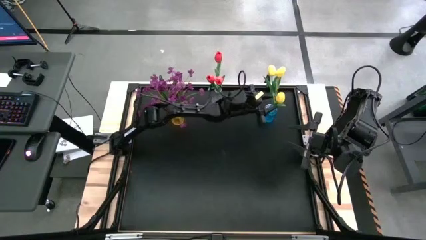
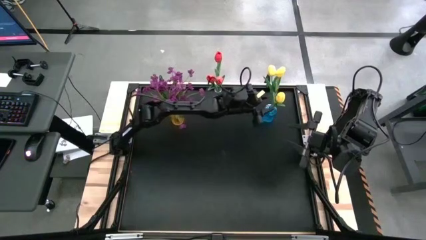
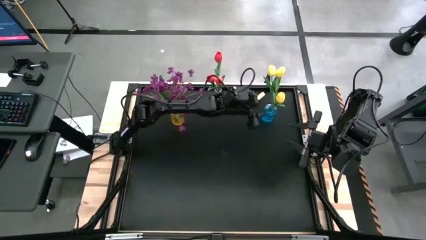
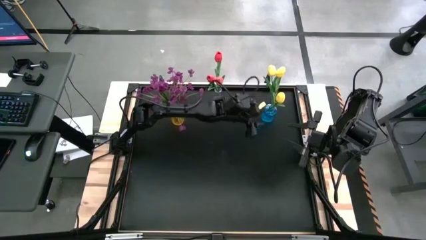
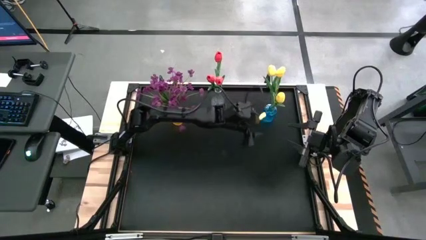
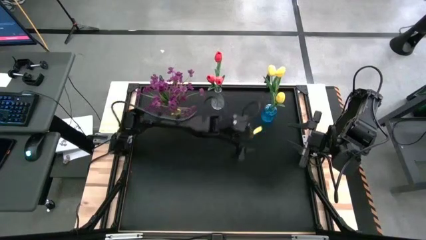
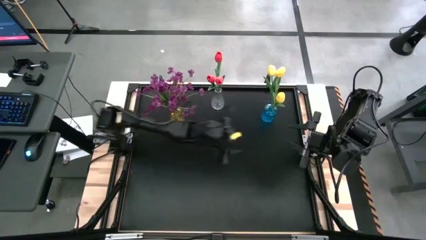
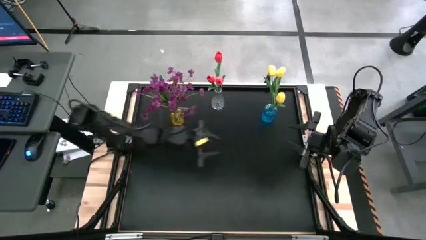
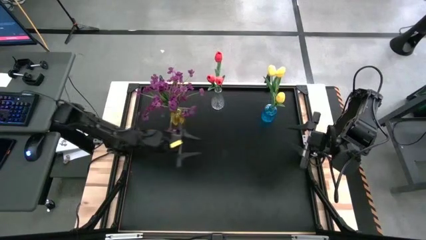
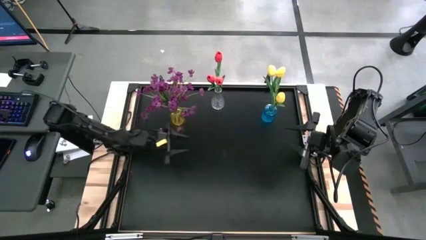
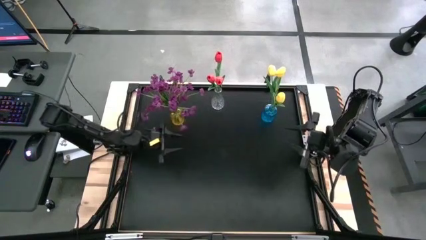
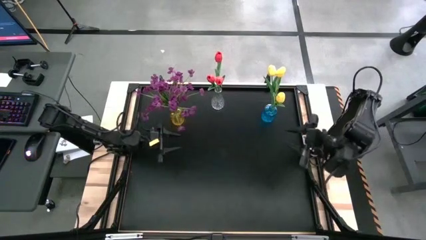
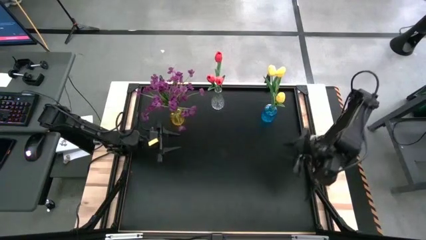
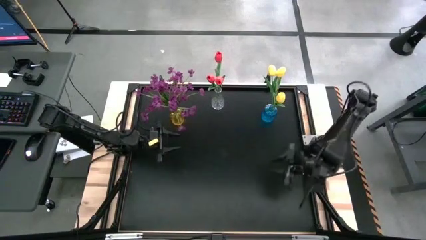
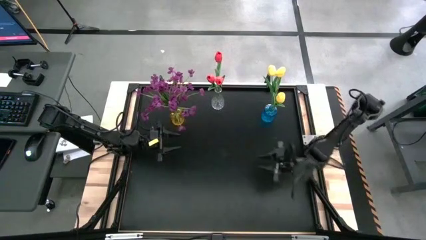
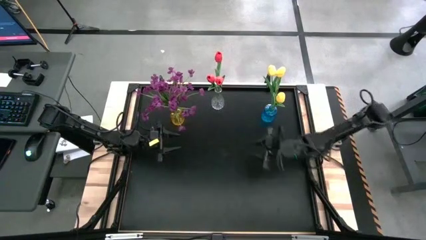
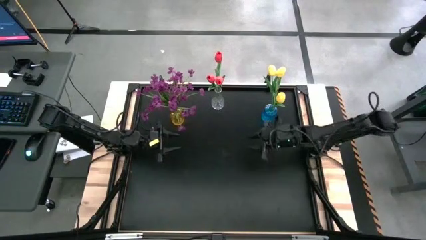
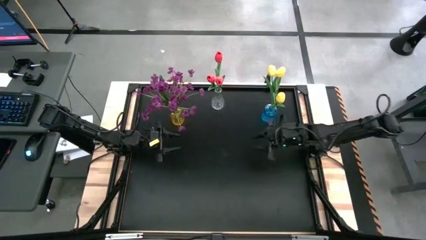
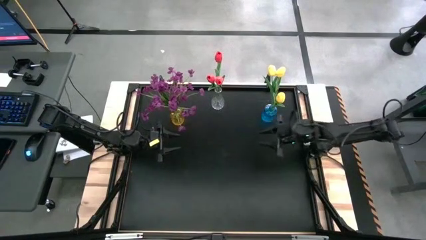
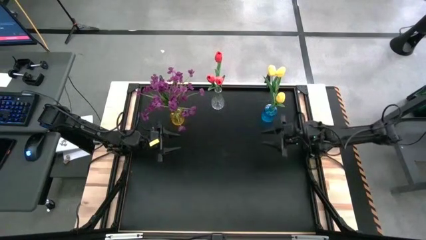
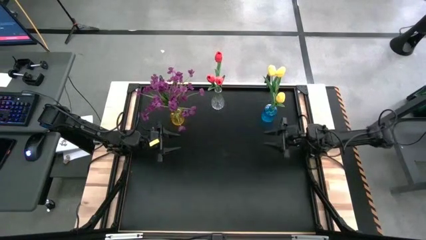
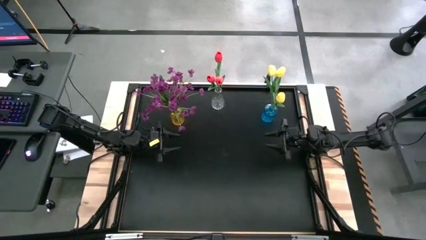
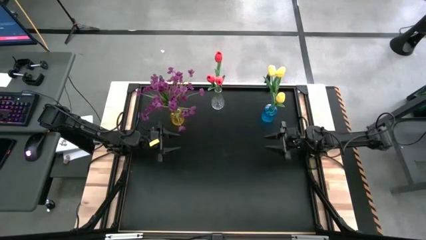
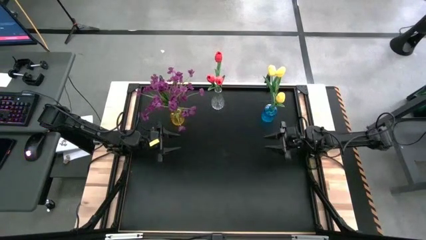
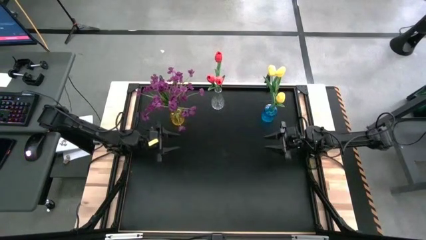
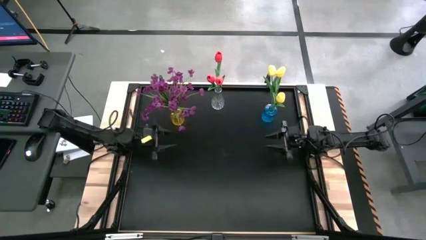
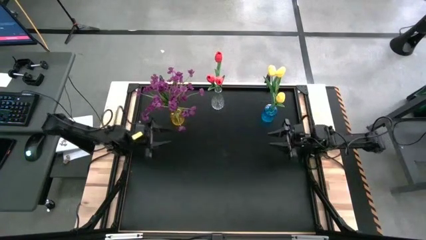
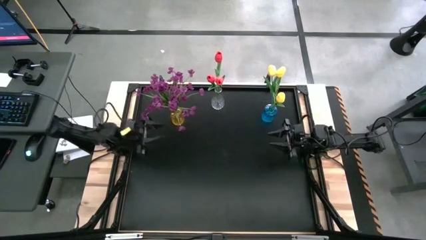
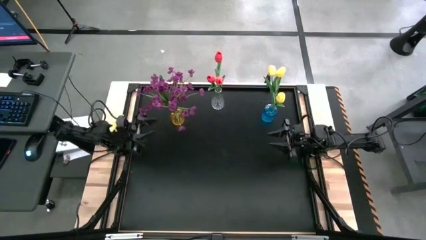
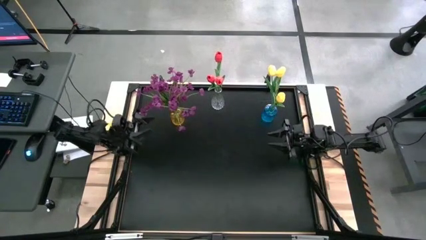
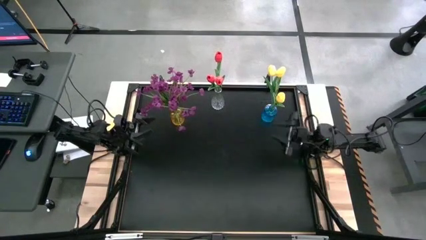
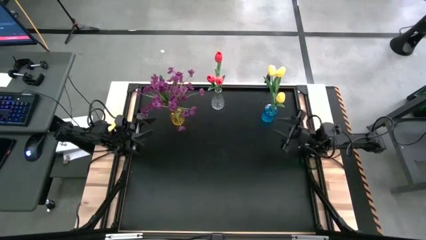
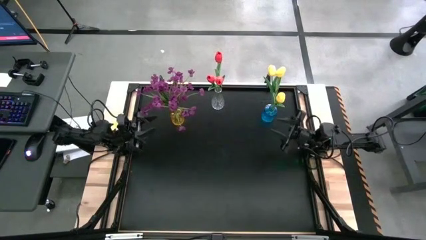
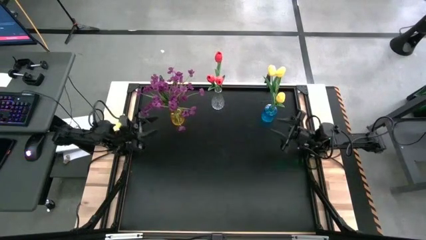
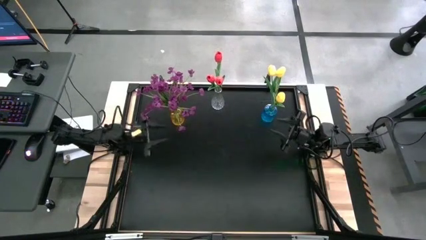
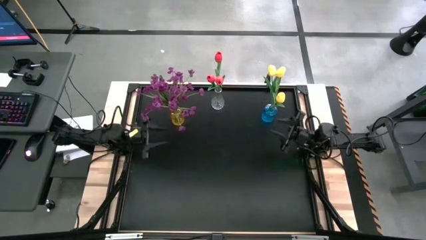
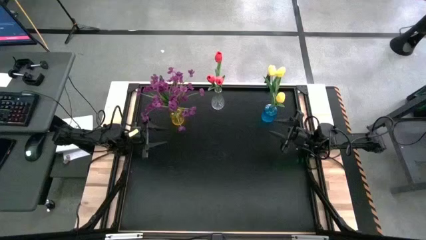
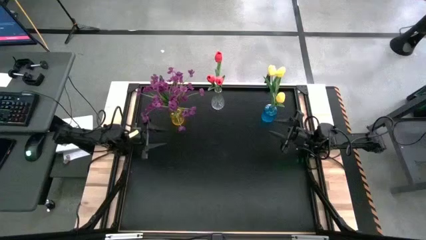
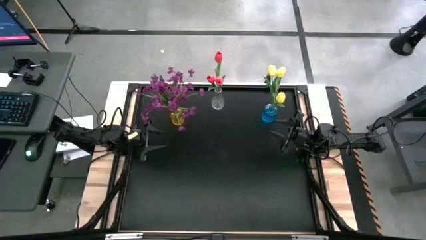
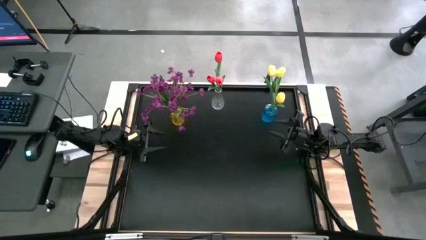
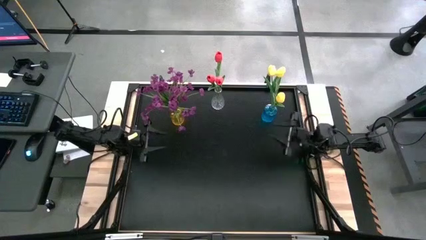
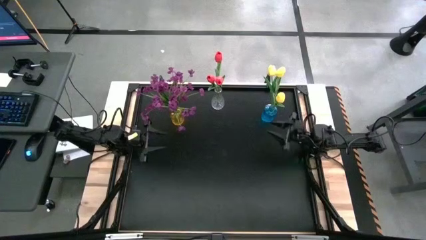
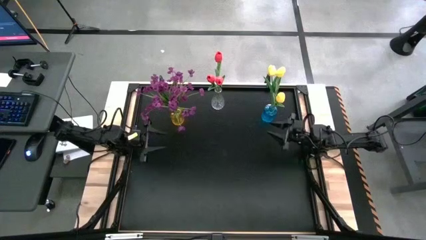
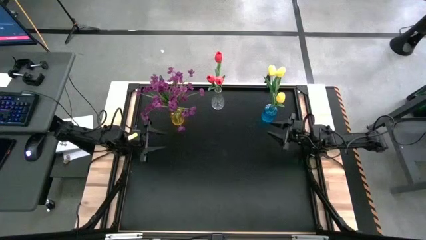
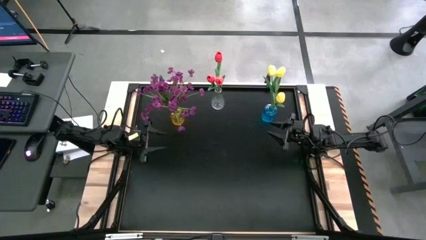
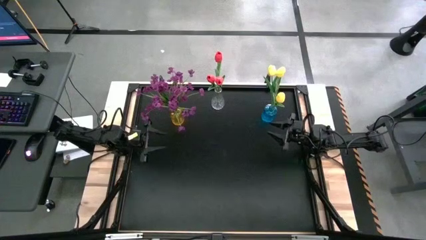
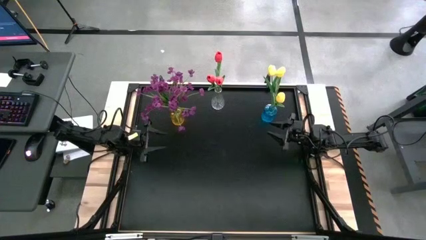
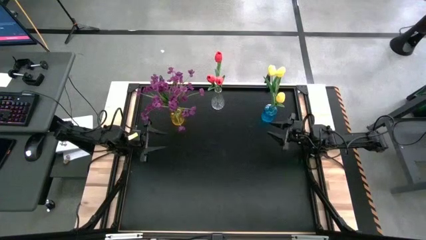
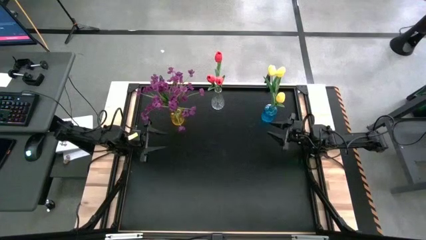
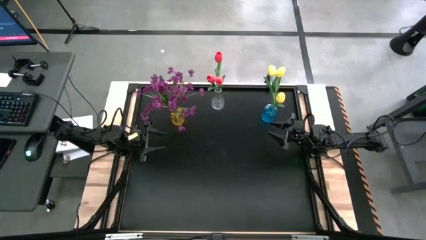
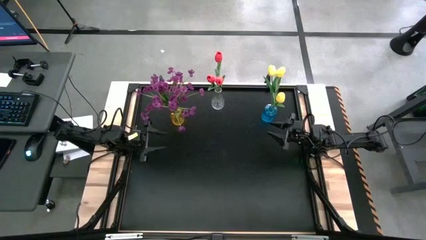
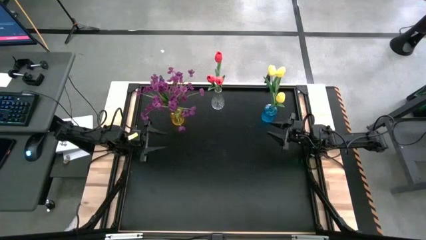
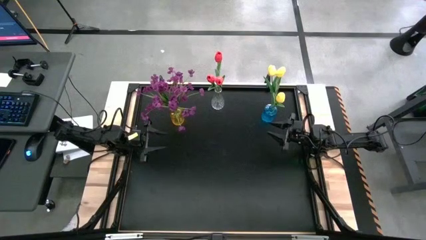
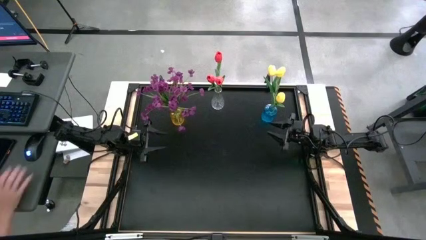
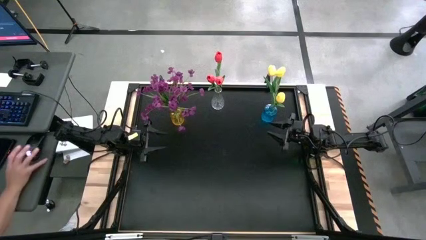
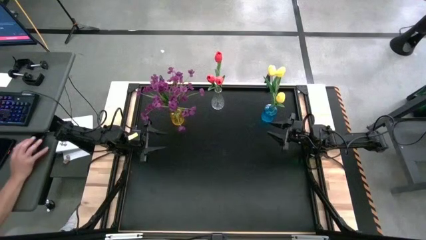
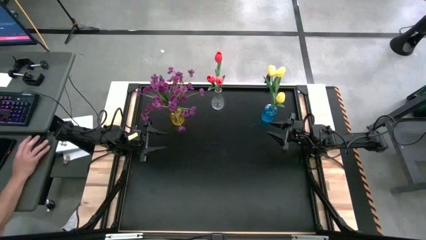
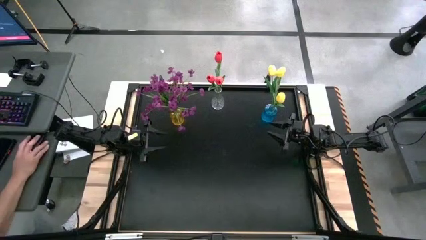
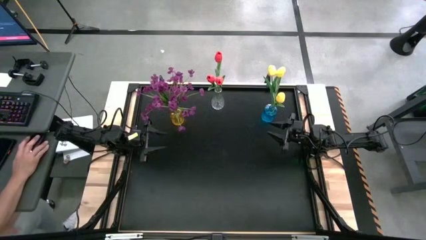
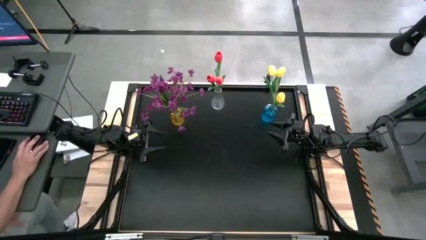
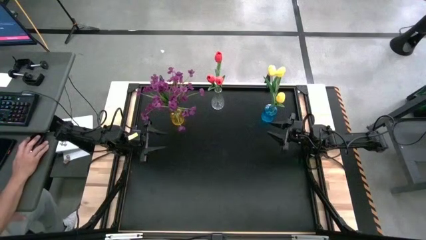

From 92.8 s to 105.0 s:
Task: Sort flowers into vase by color
Return to Home Position
